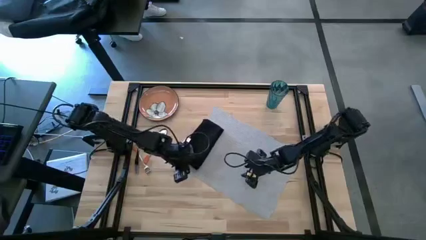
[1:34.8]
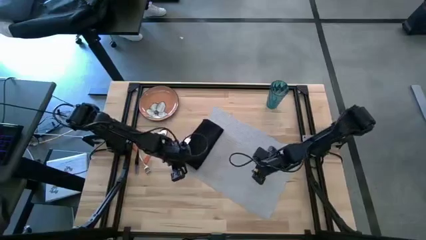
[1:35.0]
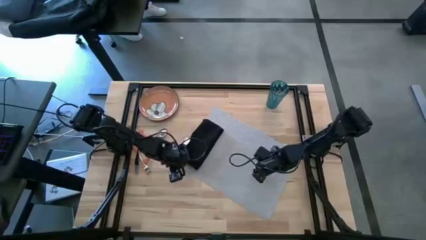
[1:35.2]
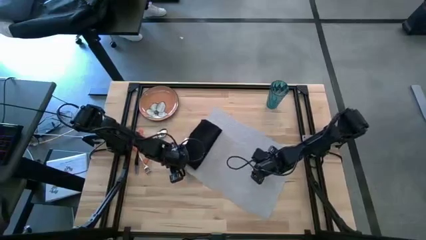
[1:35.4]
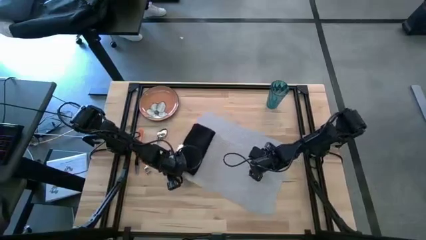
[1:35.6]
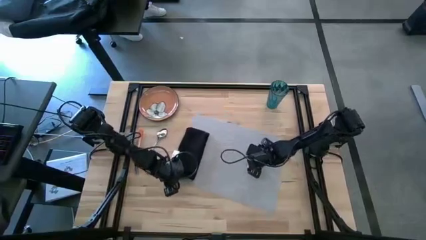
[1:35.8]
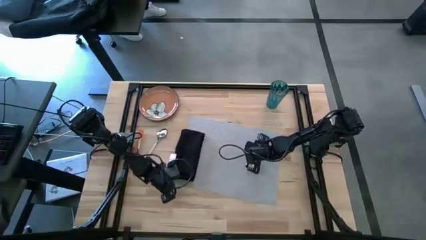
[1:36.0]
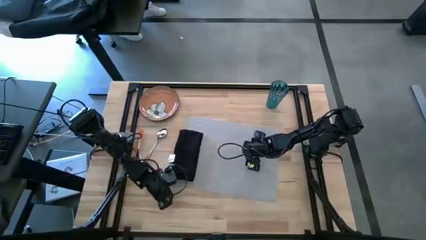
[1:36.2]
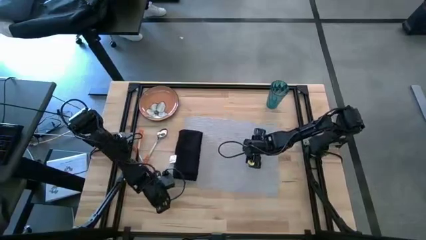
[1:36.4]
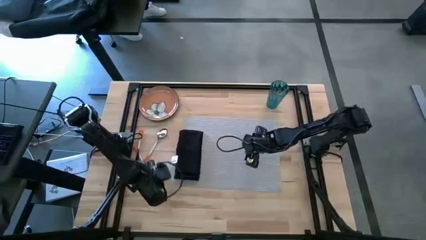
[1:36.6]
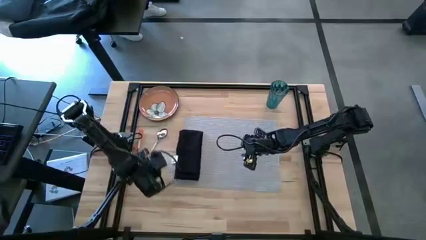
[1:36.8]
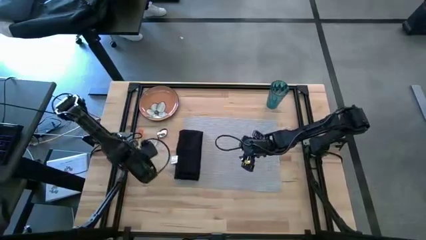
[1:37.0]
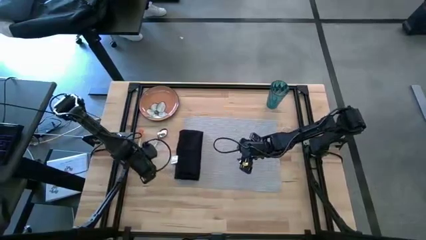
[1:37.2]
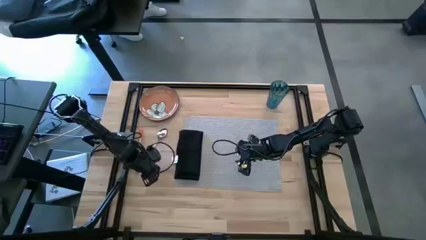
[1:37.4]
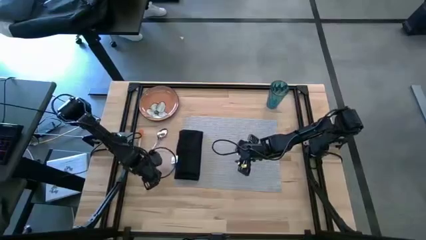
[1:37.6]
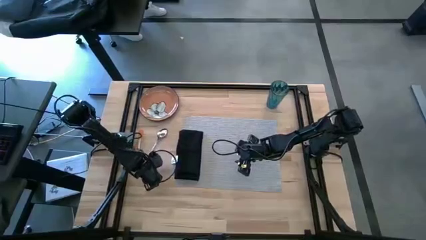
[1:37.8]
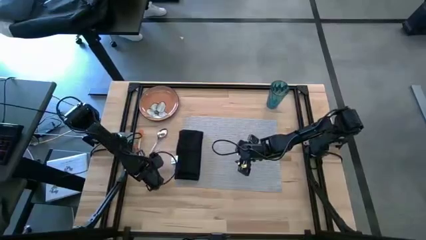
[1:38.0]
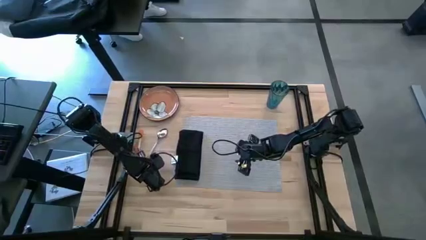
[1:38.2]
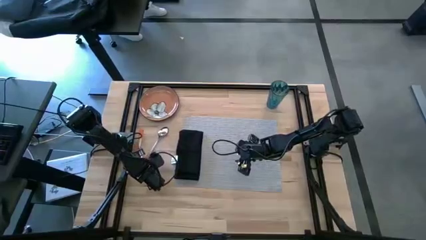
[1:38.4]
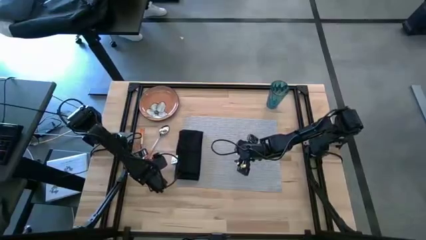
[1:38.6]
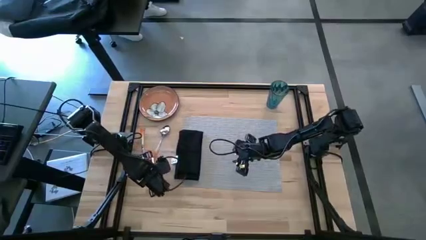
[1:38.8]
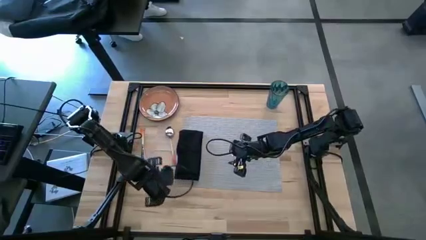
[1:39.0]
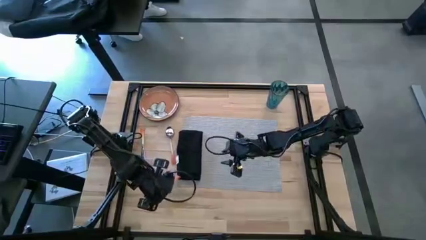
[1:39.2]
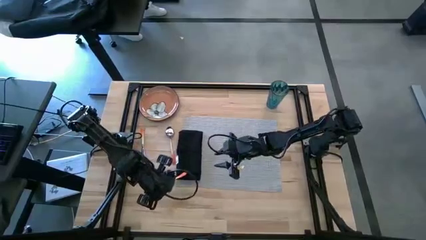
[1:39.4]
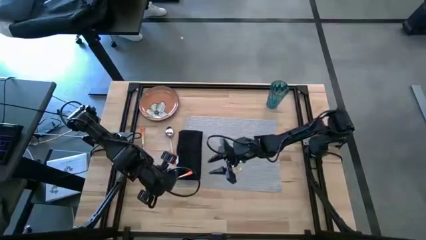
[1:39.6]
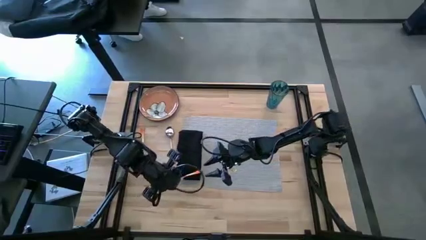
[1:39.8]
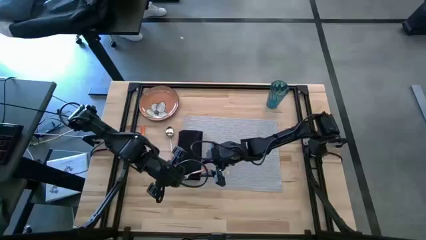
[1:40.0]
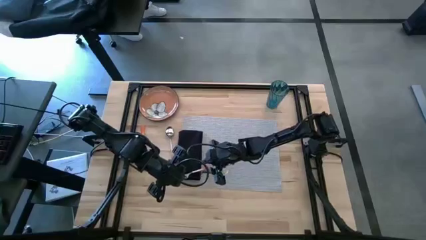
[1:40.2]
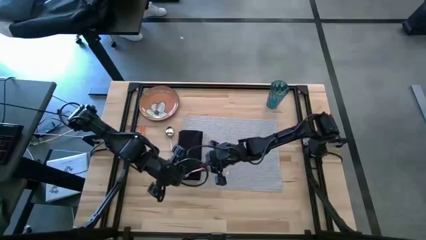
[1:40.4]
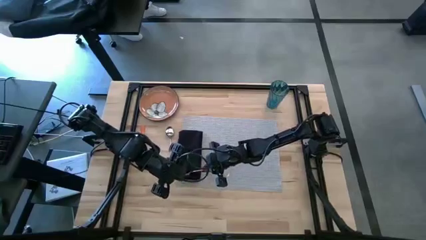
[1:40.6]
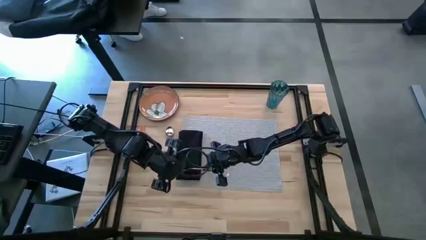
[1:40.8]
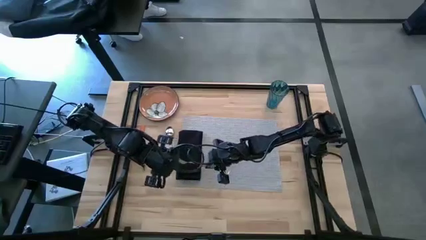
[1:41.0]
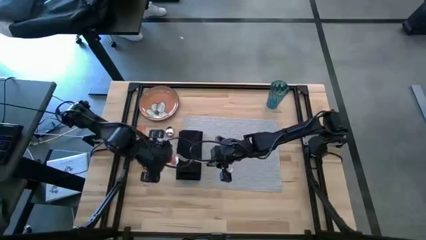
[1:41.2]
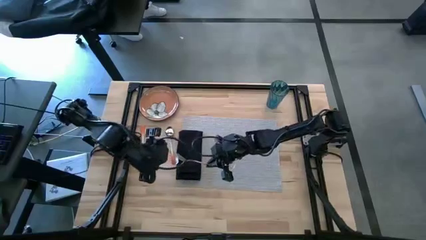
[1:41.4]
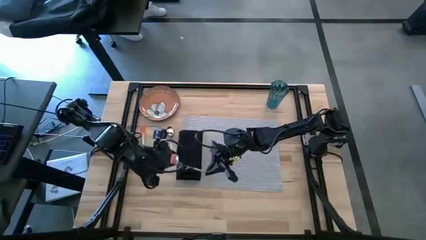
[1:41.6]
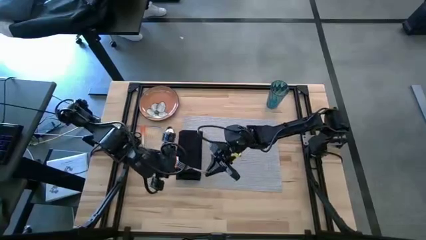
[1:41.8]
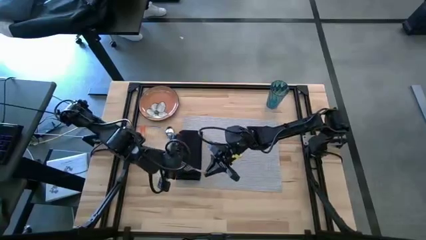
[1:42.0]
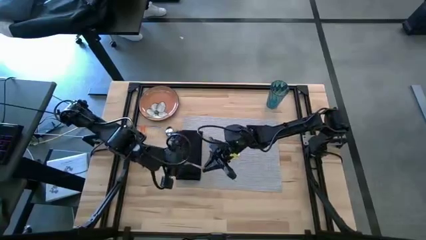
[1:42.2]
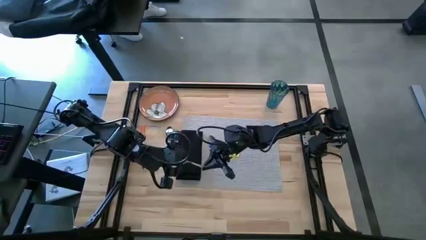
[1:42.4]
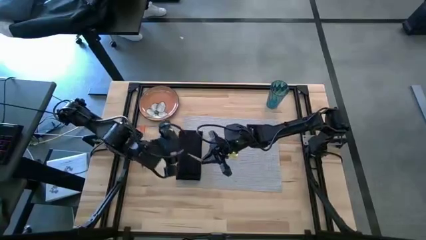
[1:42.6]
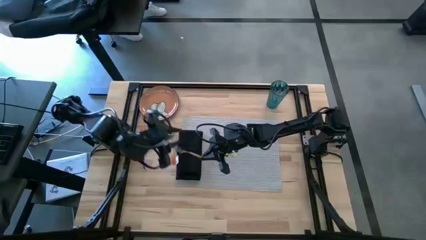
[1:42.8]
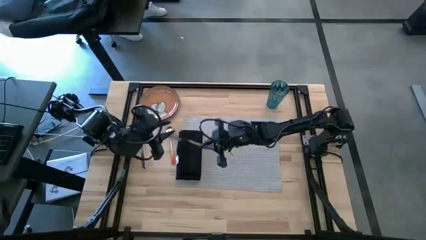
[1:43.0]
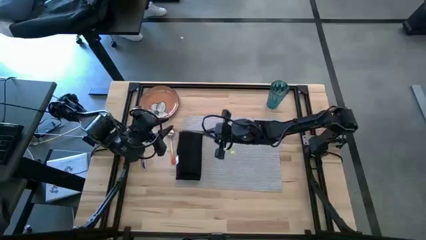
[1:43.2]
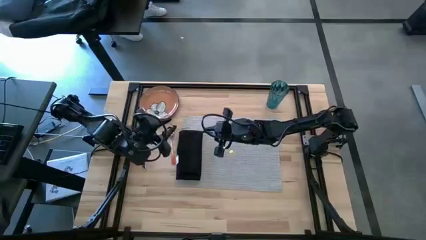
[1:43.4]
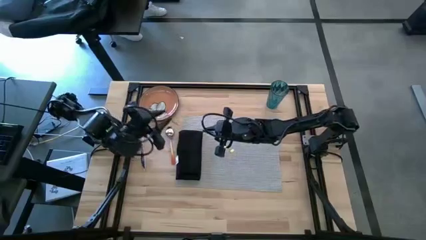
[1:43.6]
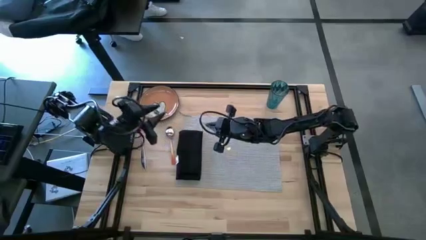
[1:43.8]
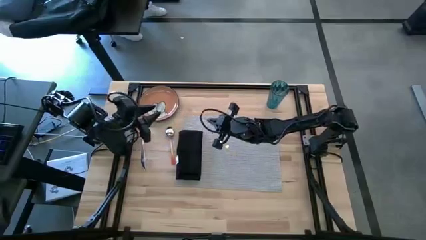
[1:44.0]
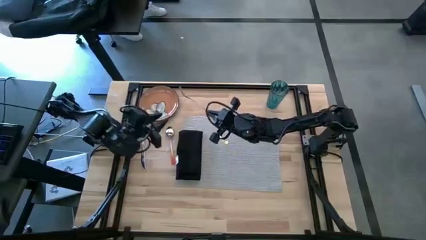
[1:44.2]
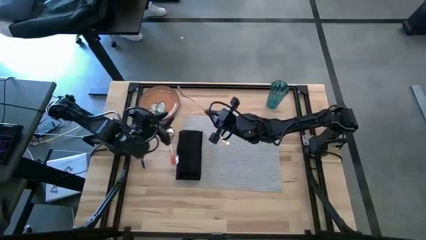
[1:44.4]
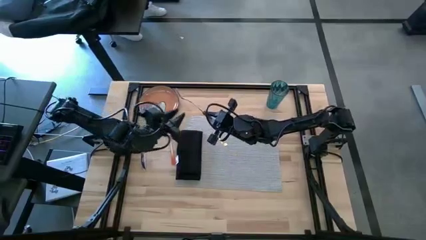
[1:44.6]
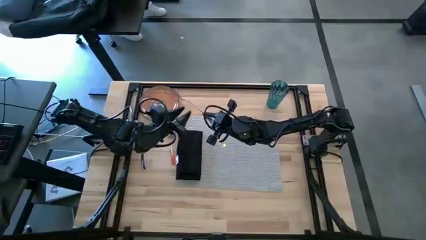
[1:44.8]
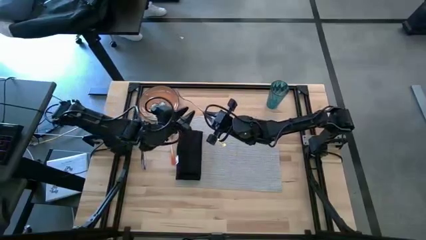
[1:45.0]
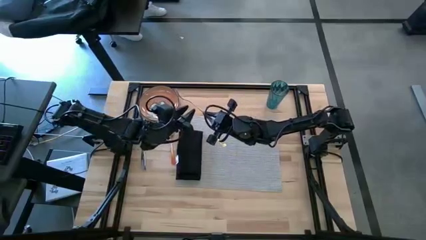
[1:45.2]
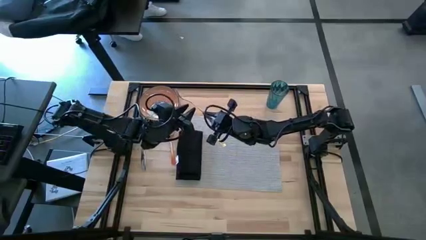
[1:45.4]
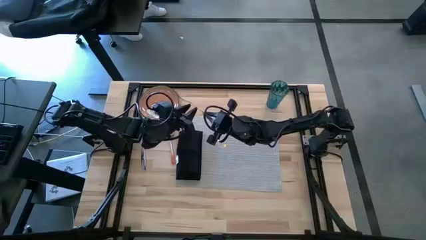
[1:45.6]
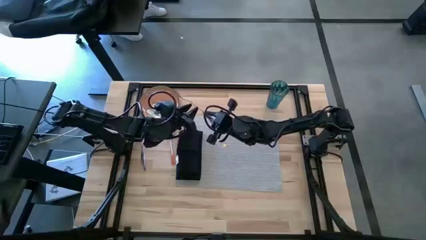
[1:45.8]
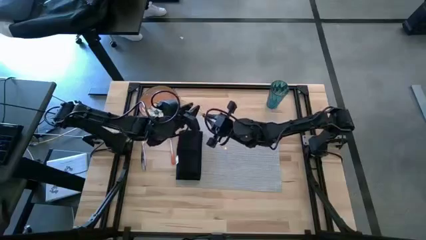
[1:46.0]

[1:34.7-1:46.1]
Task: Set table place
Put the orange fork on the top of the black table napkin

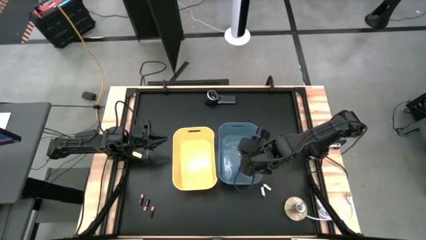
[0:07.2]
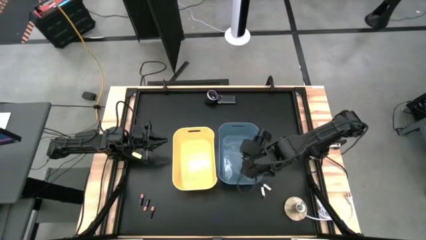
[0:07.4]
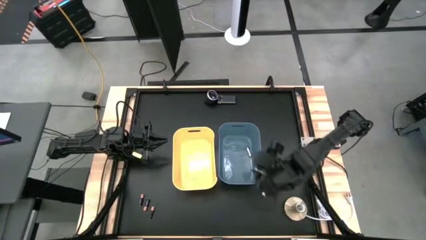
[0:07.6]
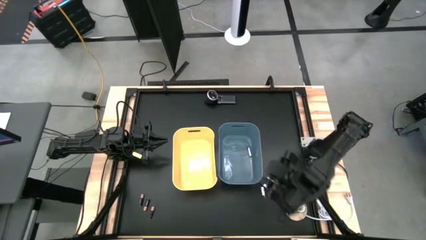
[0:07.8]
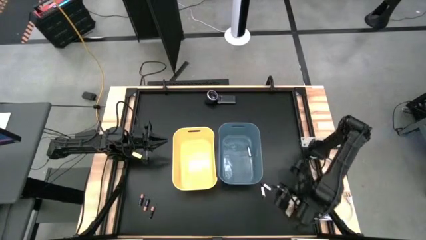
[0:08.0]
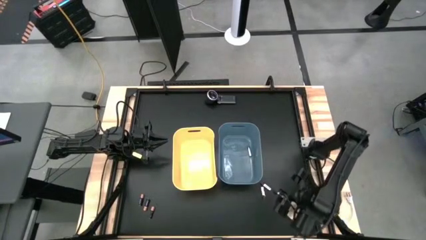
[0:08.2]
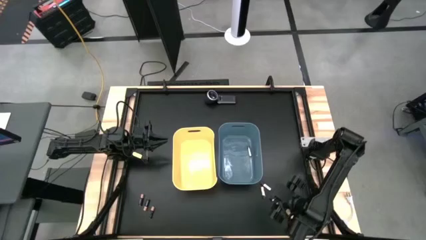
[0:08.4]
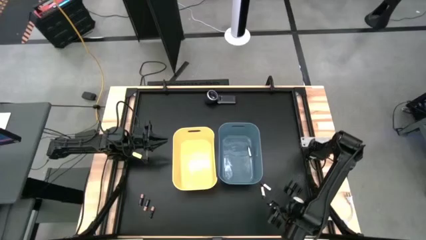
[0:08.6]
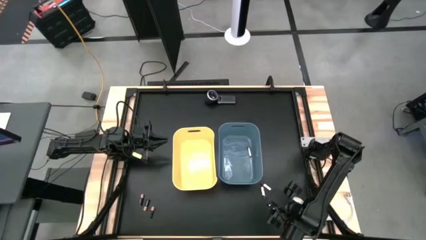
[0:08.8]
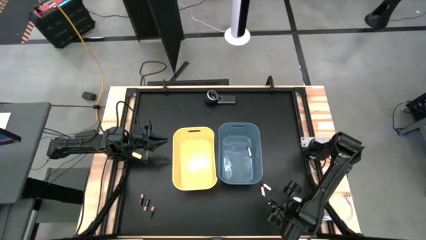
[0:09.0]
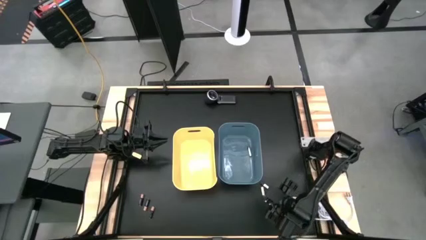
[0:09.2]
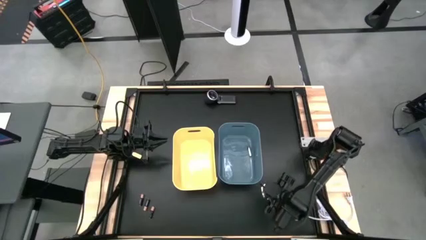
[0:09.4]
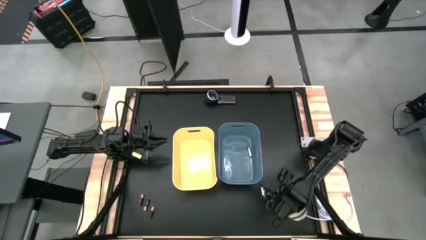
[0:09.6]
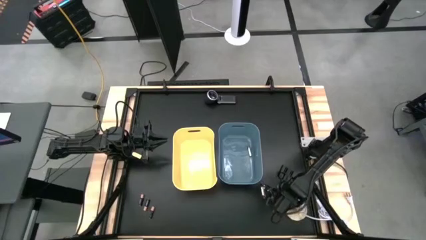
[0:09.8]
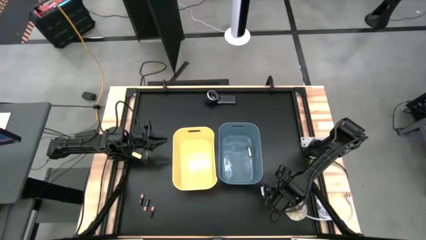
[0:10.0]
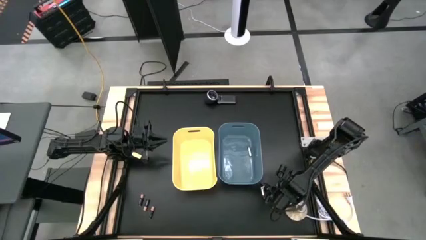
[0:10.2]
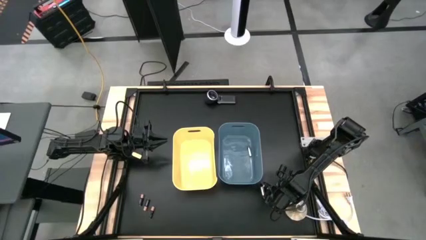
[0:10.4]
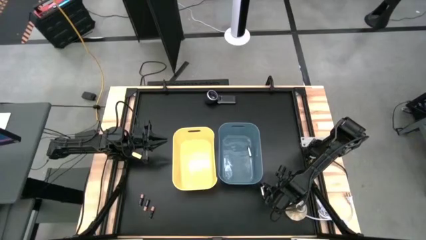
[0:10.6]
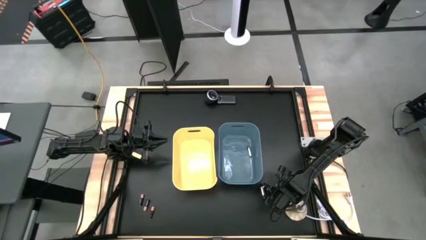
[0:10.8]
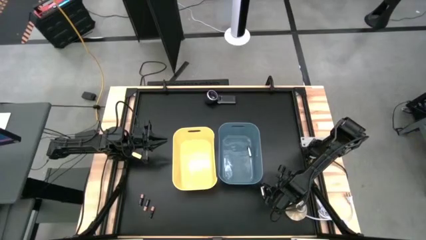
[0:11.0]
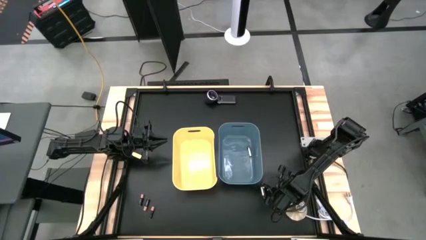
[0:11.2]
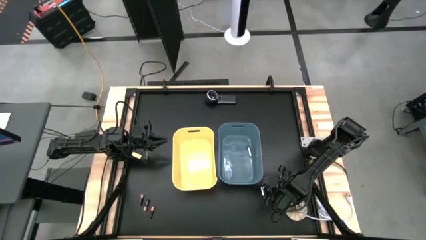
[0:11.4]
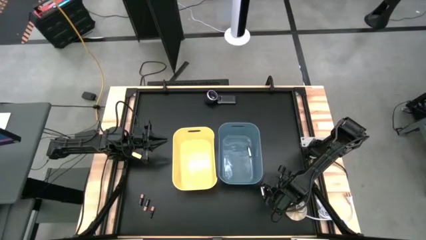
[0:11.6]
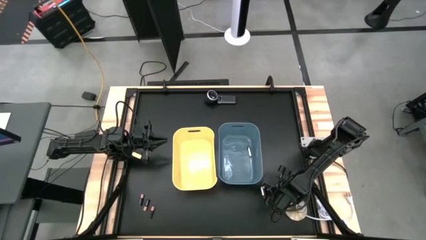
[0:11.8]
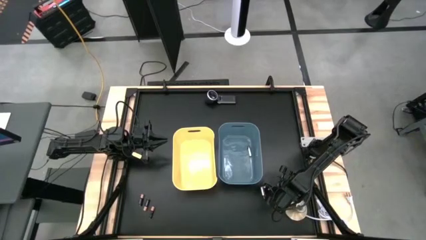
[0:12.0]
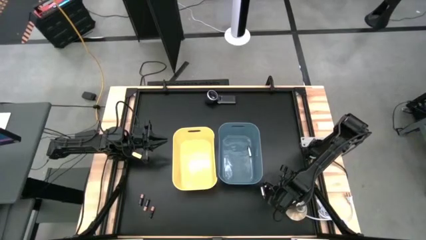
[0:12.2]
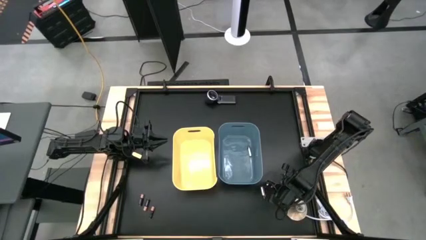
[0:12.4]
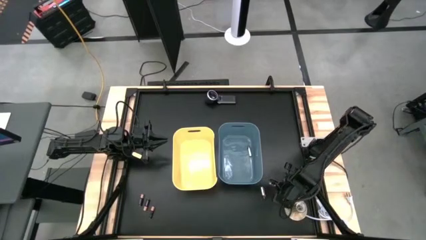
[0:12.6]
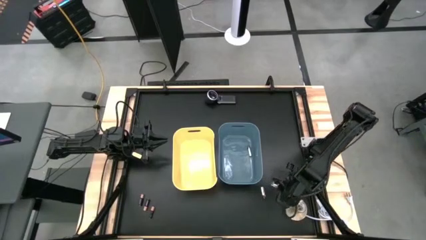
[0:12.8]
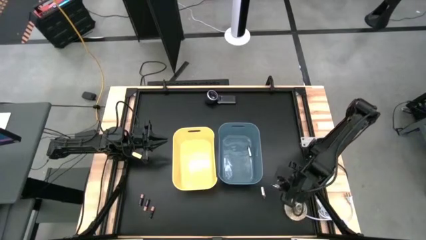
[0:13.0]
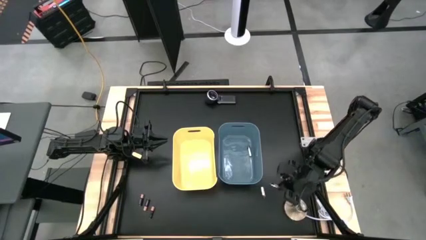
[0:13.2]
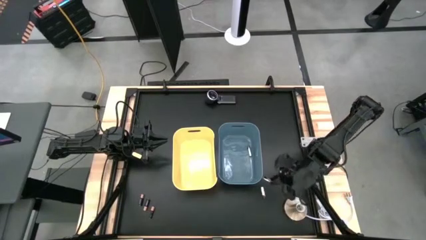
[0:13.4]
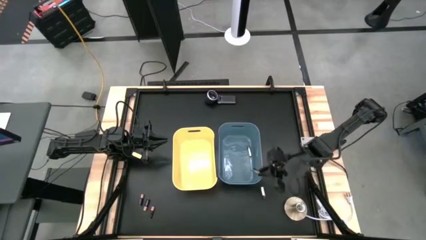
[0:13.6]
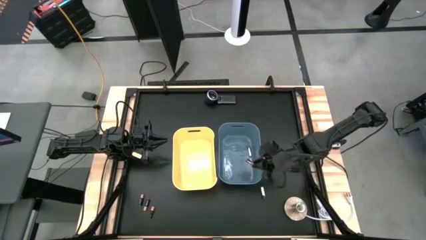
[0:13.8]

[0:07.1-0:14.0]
Task: Sort batteries
Put the right silver battery into the blue bin
